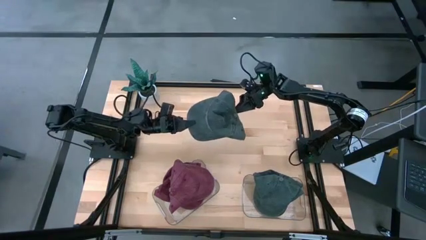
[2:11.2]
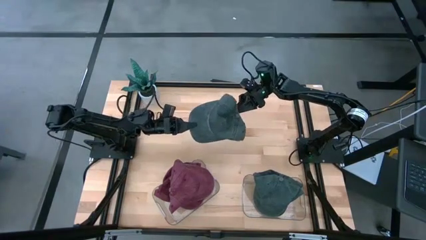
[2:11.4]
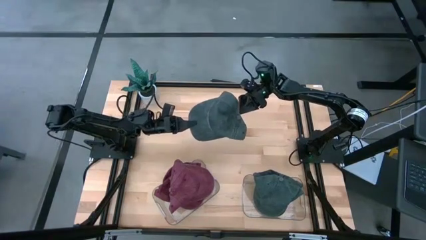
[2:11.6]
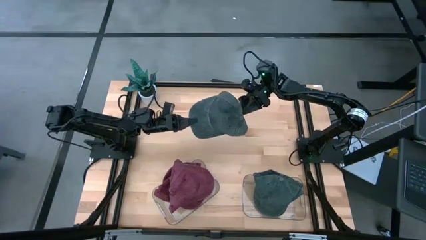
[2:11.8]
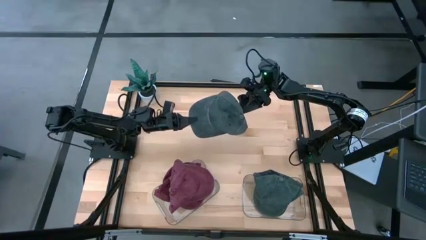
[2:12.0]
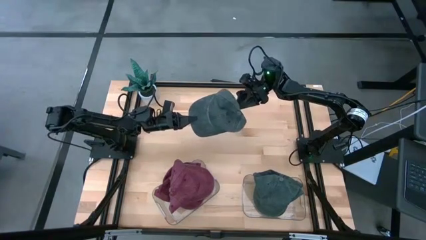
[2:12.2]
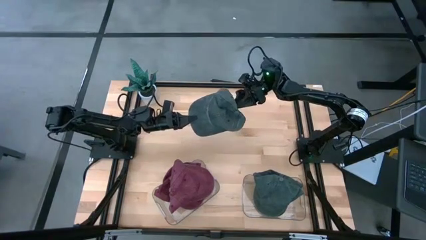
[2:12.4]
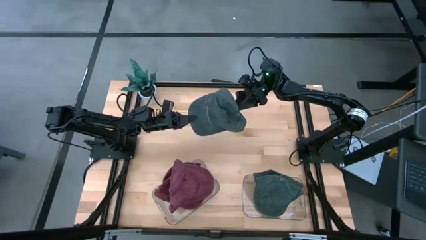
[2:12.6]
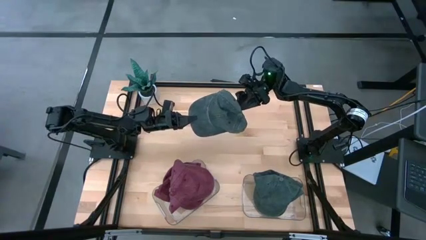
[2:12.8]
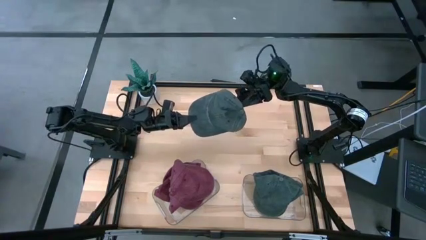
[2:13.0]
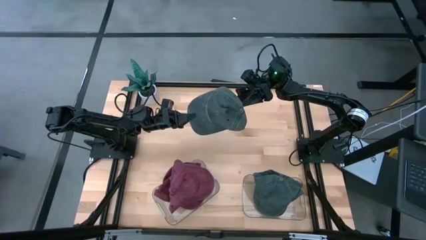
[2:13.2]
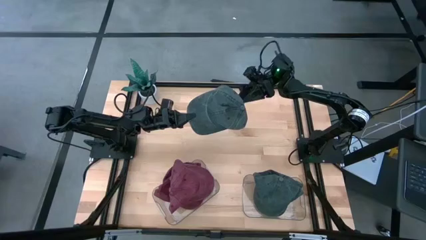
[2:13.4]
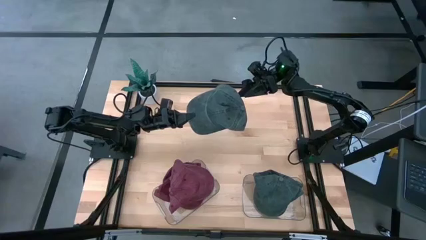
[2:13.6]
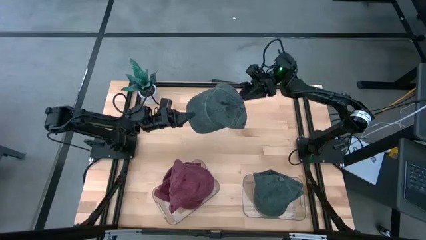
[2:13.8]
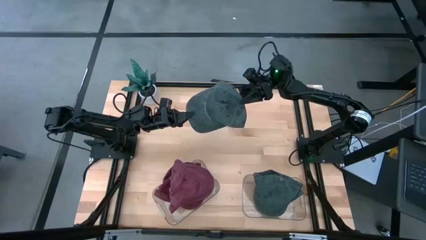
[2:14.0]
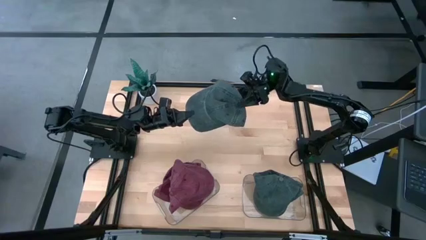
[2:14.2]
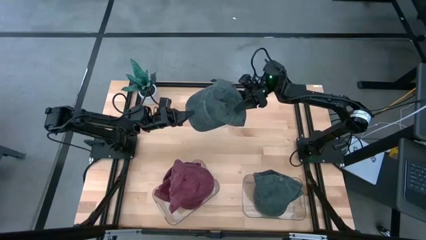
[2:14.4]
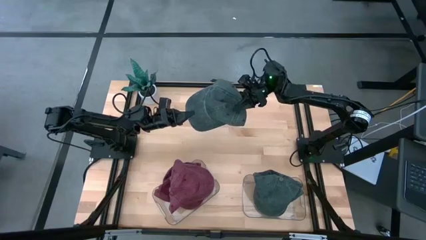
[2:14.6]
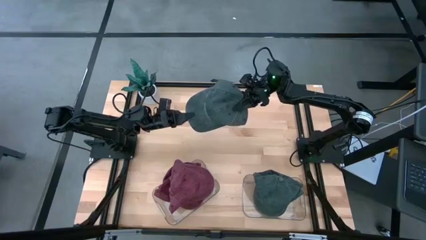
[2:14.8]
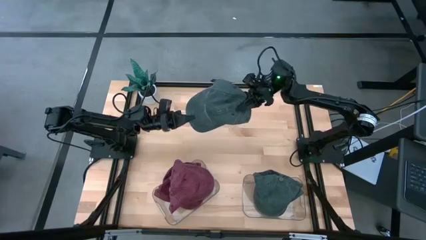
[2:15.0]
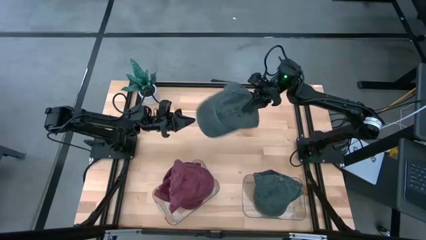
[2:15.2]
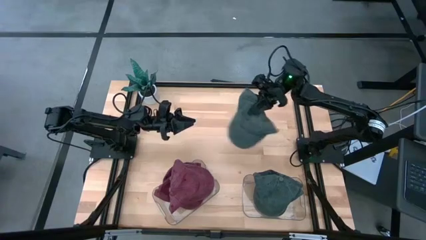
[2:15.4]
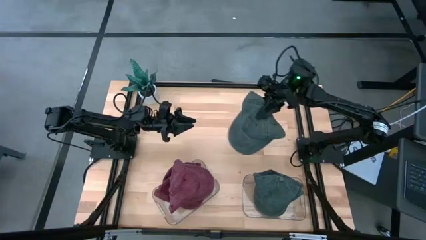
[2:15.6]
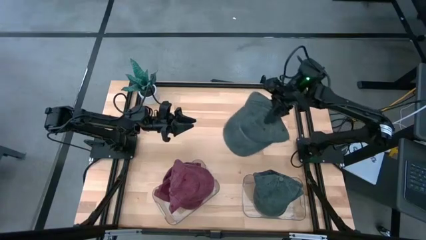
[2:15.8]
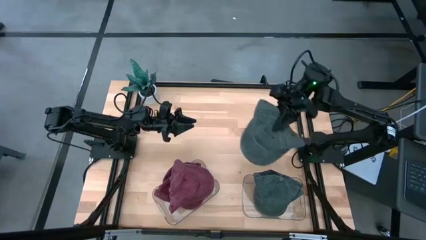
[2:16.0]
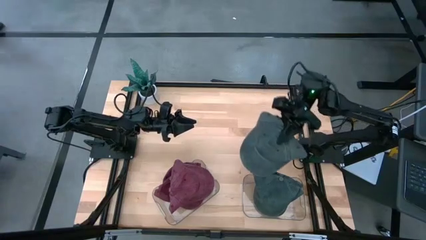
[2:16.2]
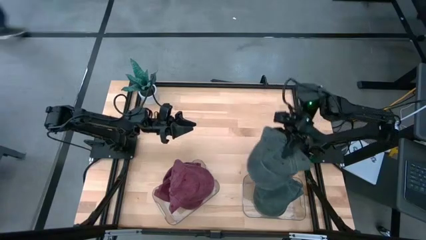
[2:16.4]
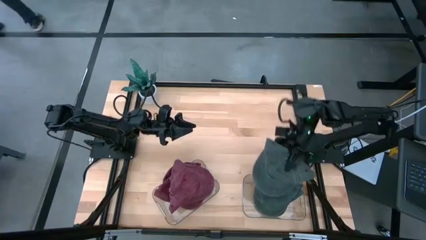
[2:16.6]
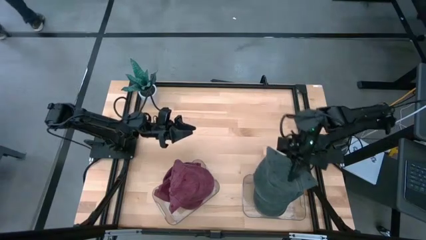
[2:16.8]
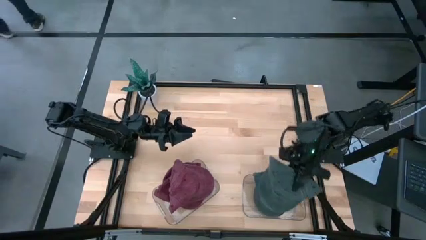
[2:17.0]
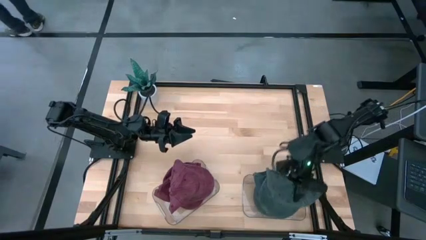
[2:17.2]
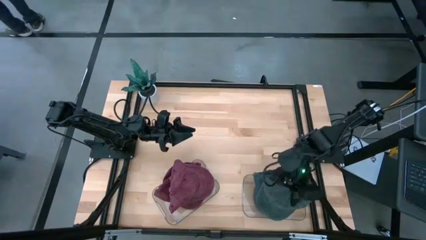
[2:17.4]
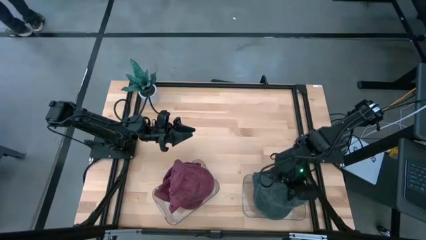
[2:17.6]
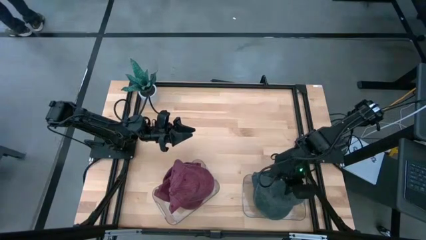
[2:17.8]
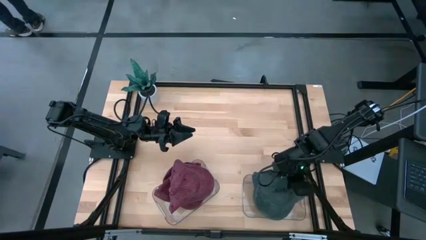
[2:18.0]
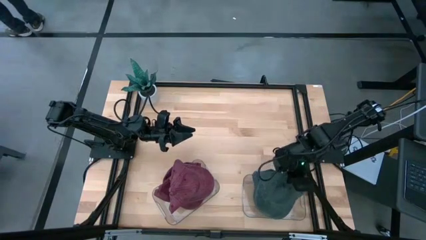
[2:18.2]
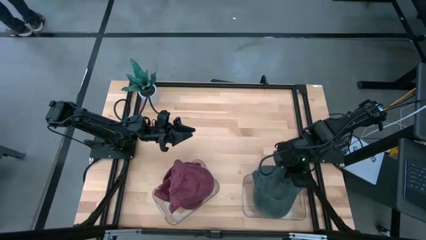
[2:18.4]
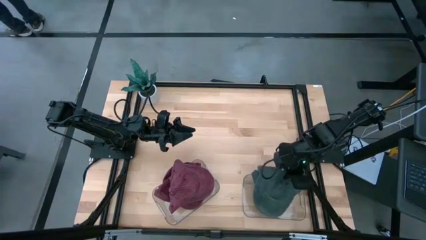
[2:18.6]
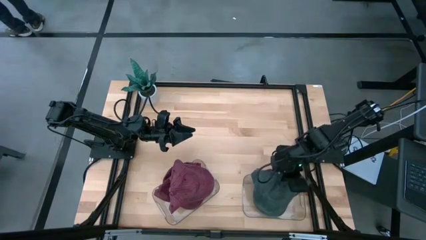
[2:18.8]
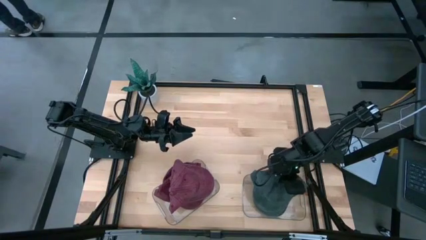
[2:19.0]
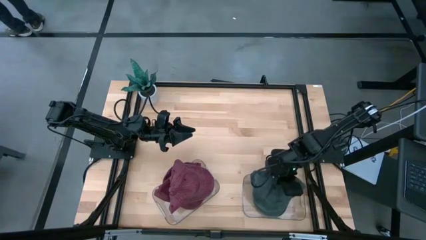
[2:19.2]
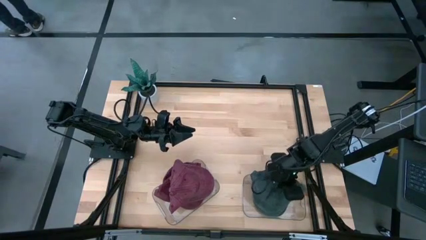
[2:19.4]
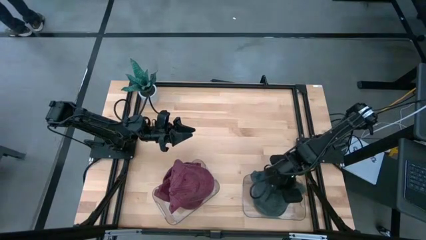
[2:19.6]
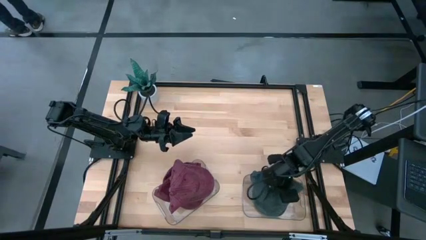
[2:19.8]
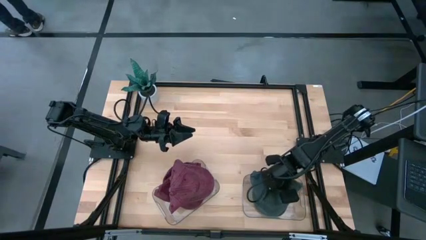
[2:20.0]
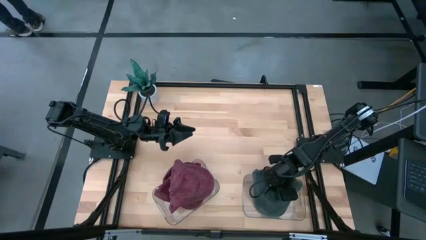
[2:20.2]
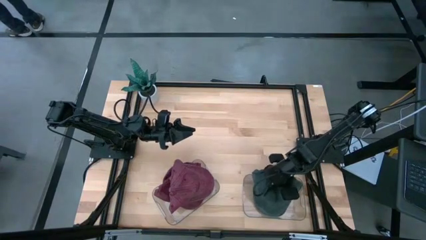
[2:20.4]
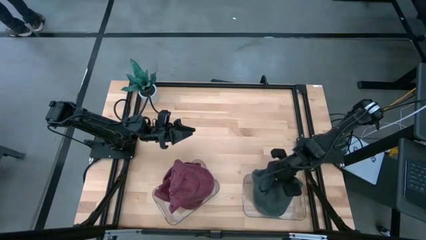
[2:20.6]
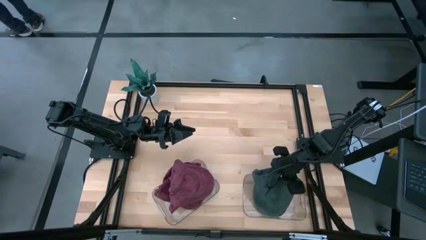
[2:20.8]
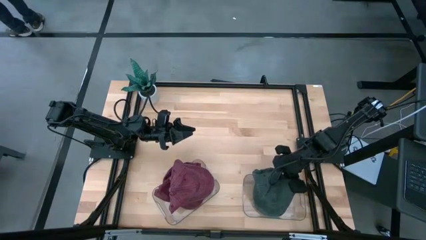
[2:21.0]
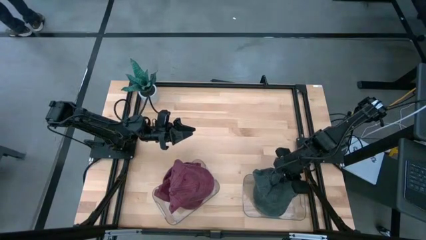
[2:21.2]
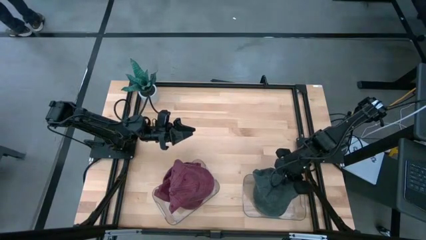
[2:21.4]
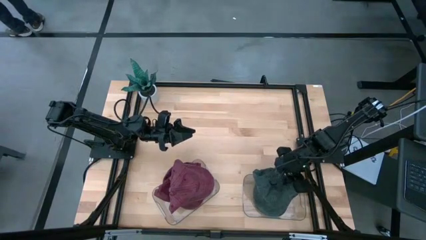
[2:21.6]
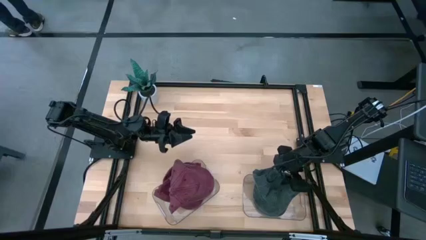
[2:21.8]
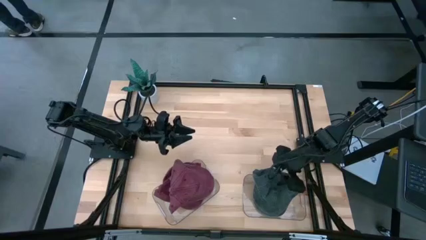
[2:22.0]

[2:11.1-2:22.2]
Task: Pick & Place hat
Put the gray cap into the right transparent bin

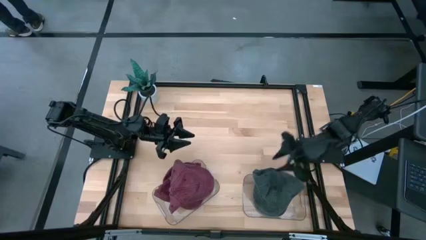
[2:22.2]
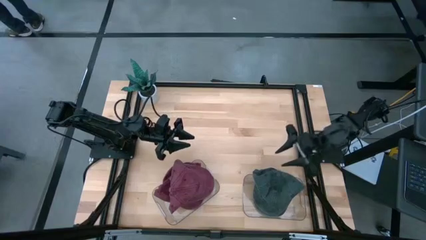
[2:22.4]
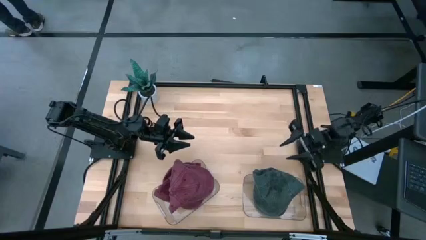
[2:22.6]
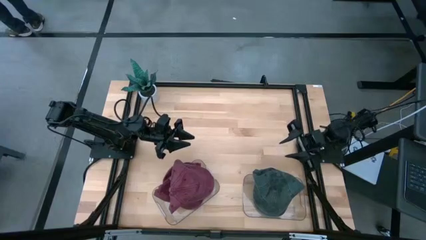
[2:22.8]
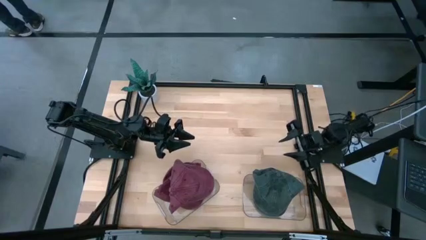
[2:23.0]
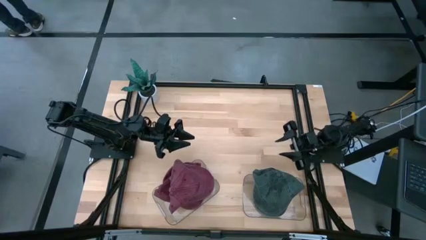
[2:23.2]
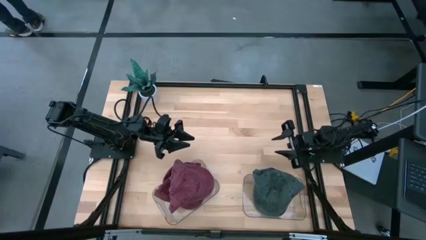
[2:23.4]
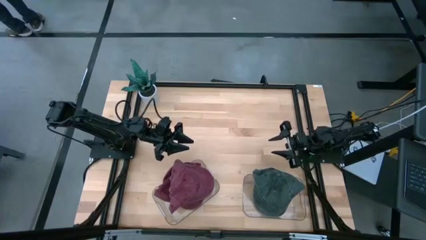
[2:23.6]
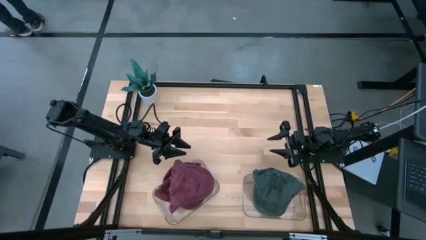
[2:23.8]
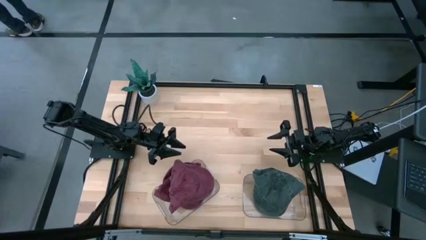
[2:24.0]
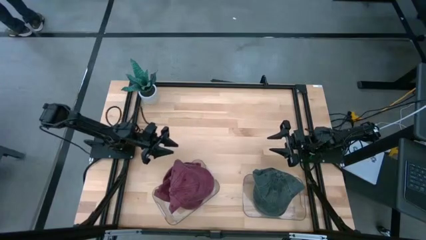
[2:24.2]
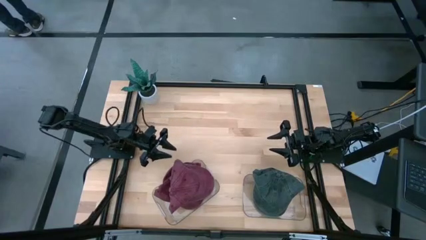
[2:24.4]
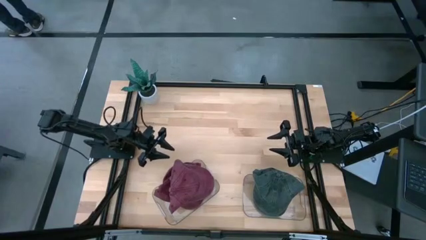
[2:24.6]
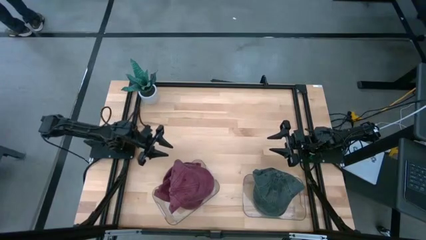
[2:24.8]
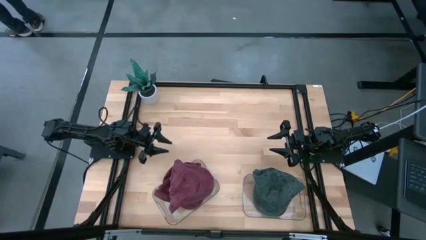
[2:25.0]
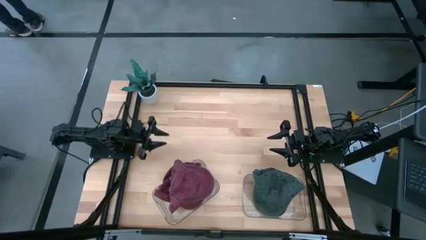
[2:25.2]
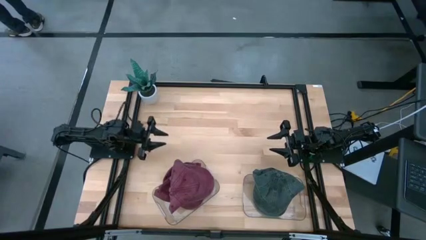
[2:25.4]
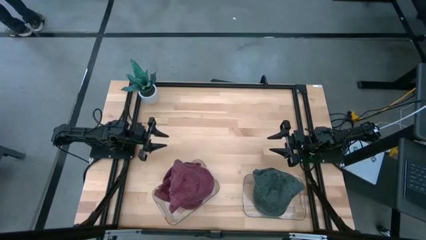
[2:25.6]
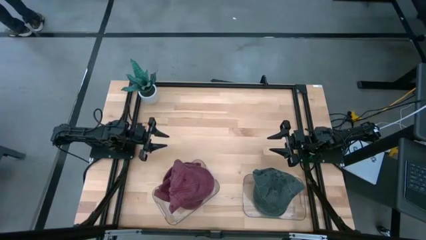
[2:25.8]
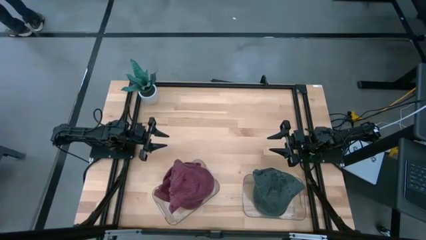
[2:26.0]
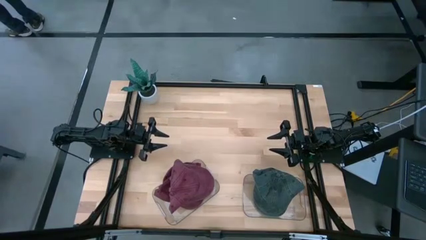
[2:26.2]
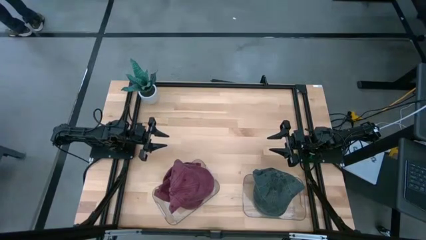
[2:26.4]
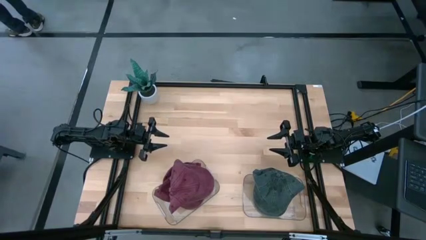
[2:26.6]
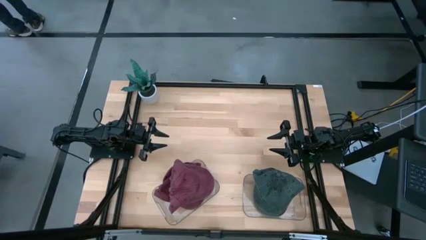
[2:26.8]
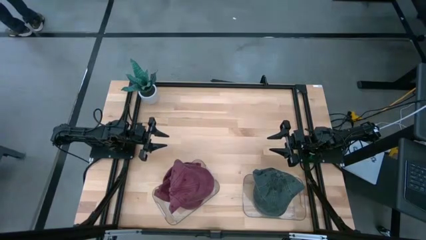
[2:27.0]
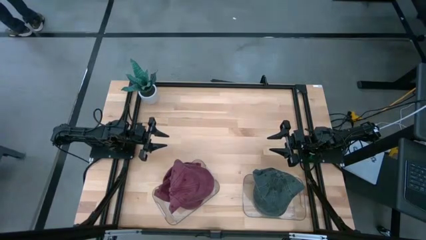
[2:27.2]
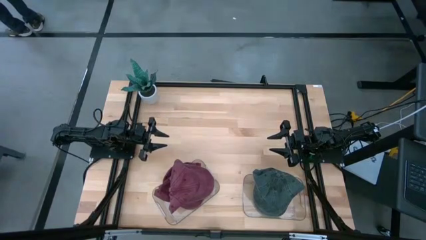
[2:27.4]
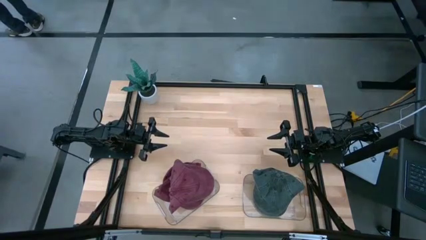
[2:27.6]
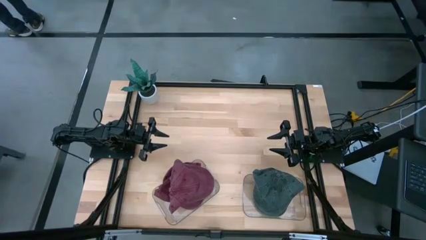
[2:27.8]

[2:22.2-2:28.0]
Return to Home Position
